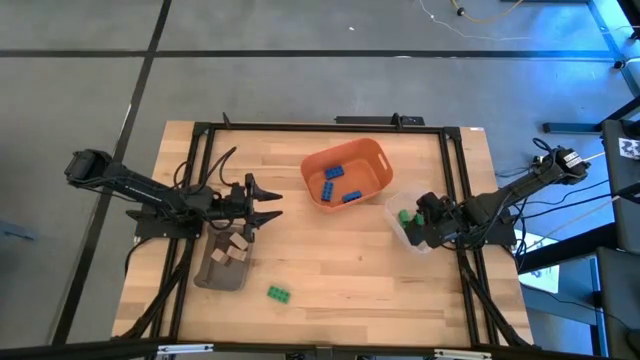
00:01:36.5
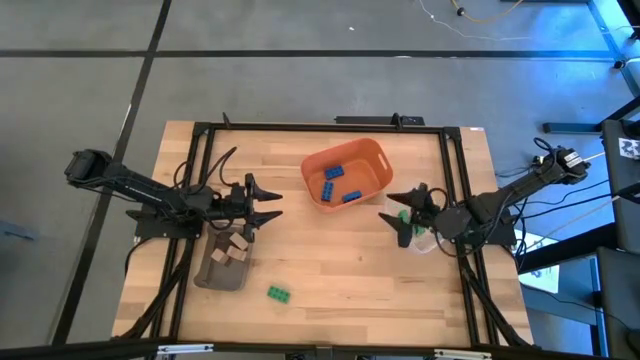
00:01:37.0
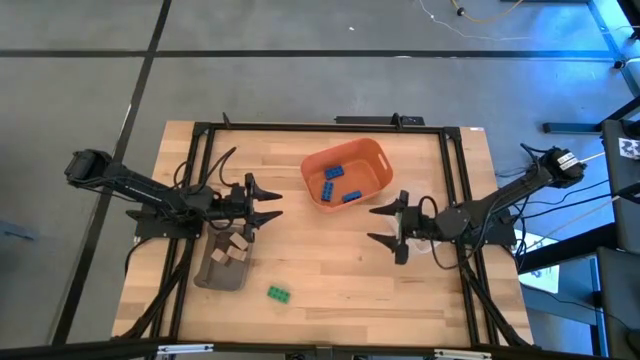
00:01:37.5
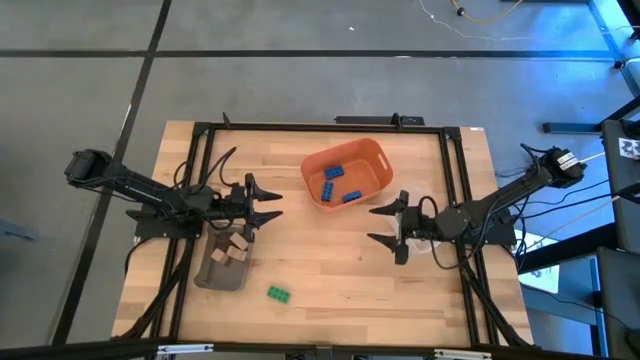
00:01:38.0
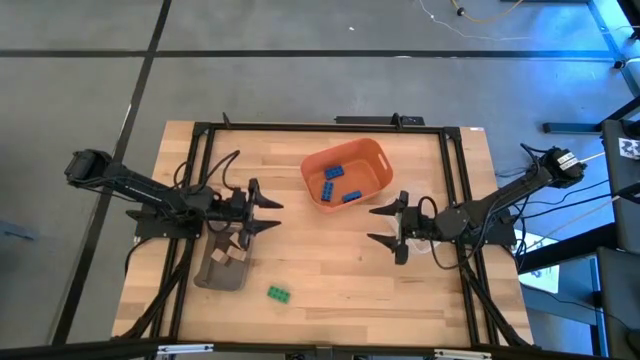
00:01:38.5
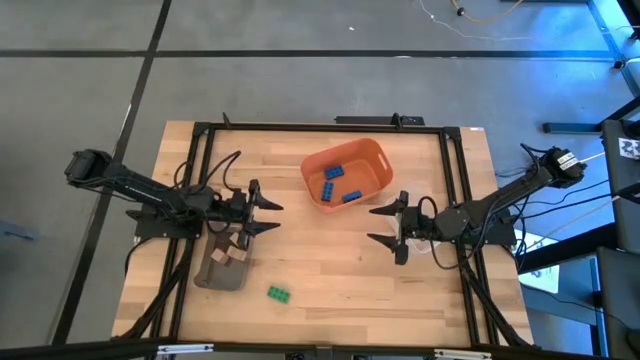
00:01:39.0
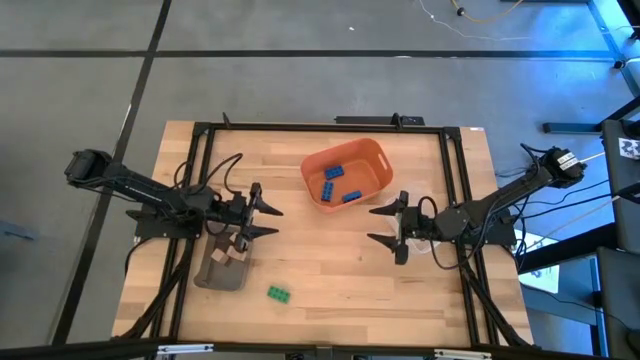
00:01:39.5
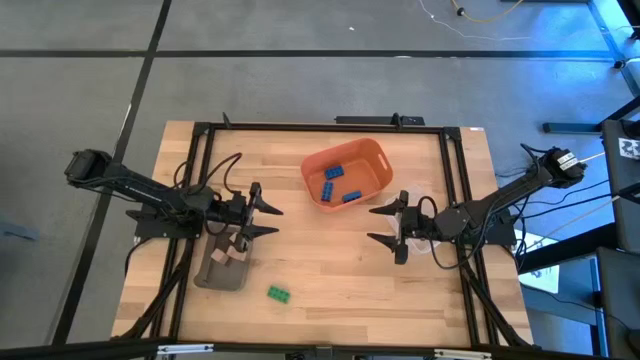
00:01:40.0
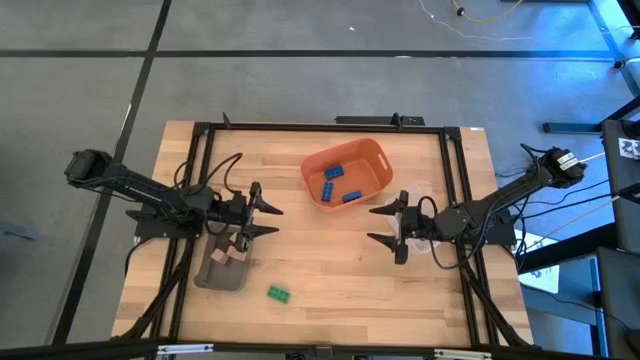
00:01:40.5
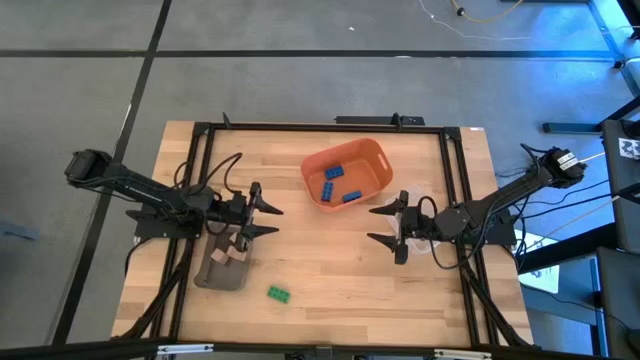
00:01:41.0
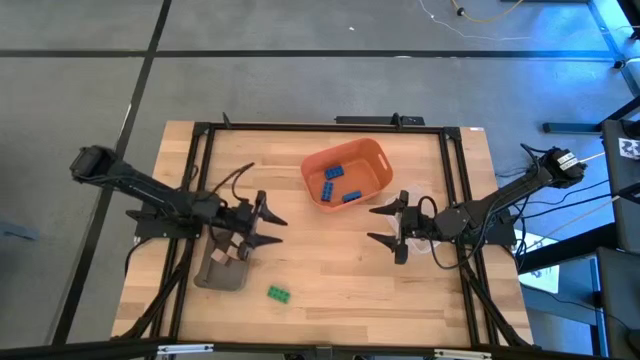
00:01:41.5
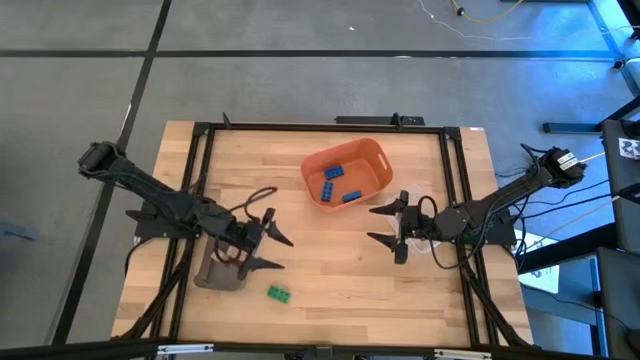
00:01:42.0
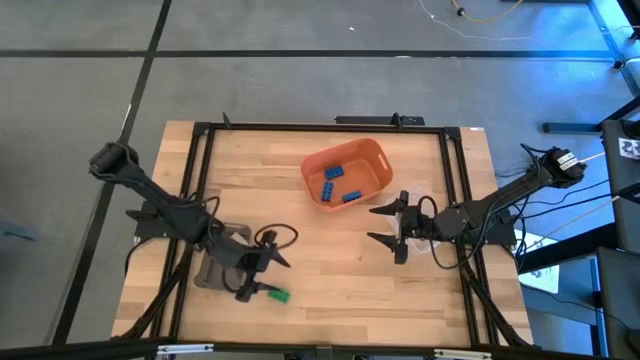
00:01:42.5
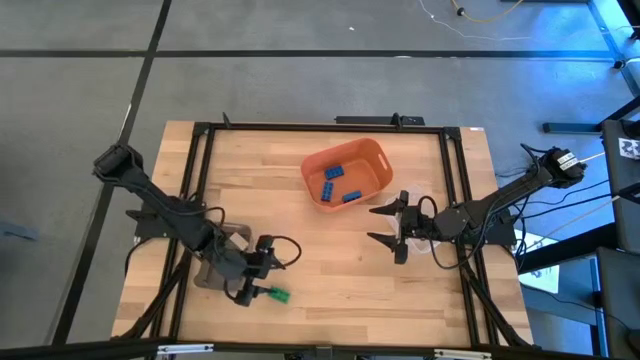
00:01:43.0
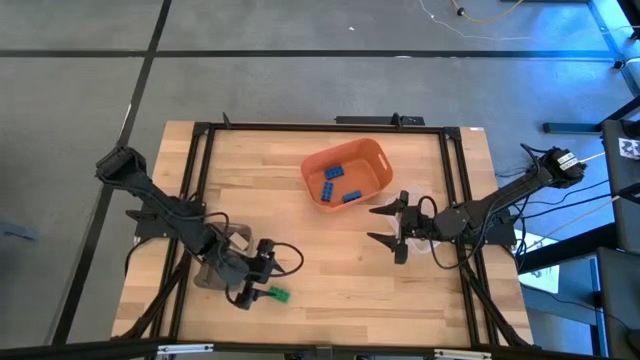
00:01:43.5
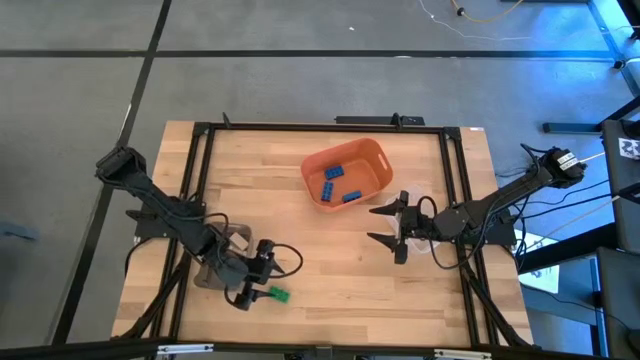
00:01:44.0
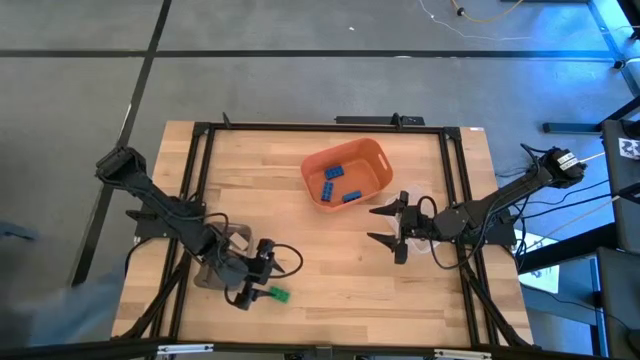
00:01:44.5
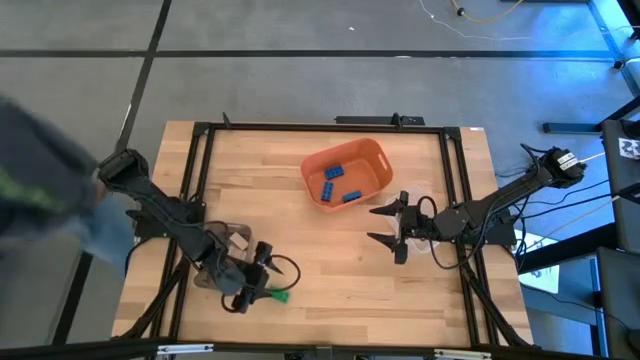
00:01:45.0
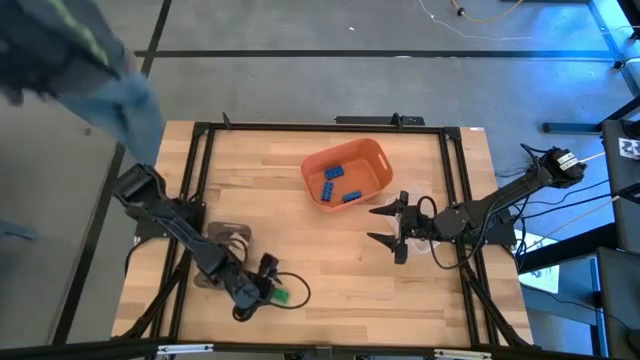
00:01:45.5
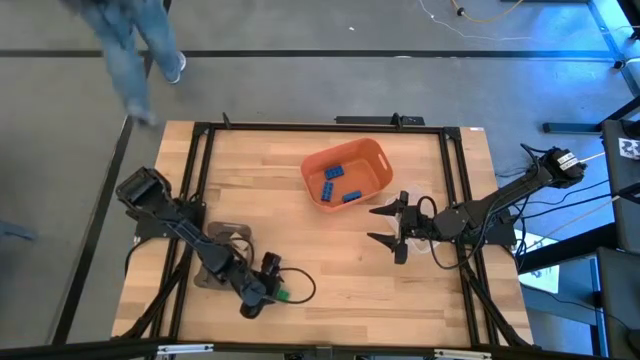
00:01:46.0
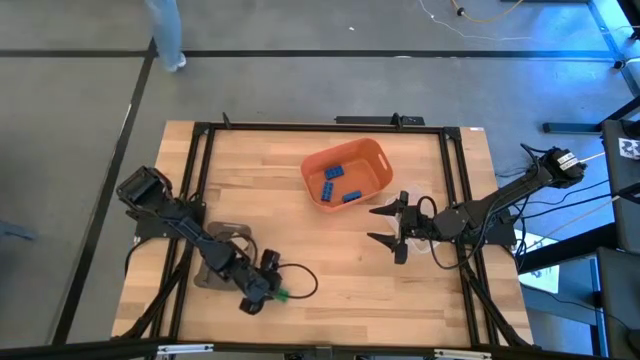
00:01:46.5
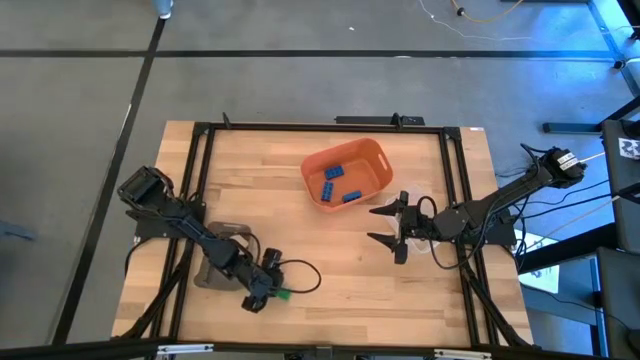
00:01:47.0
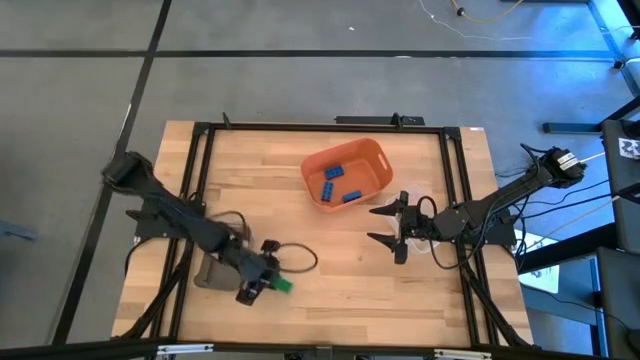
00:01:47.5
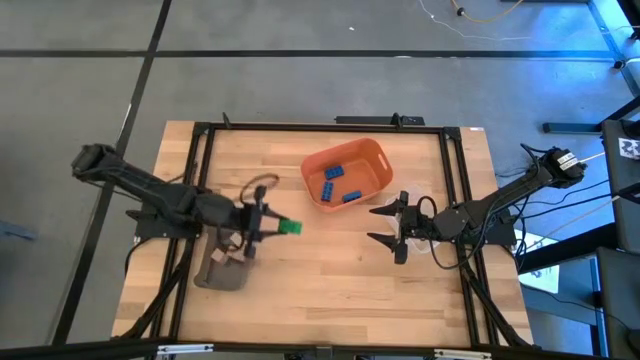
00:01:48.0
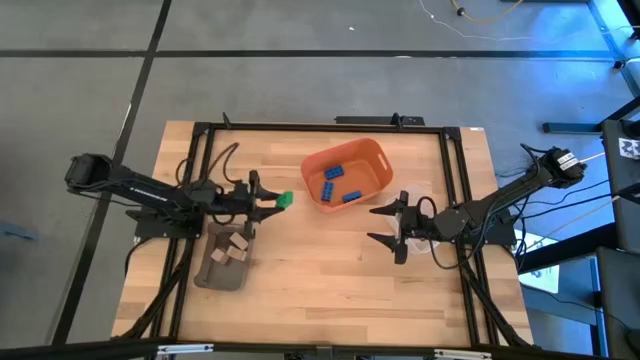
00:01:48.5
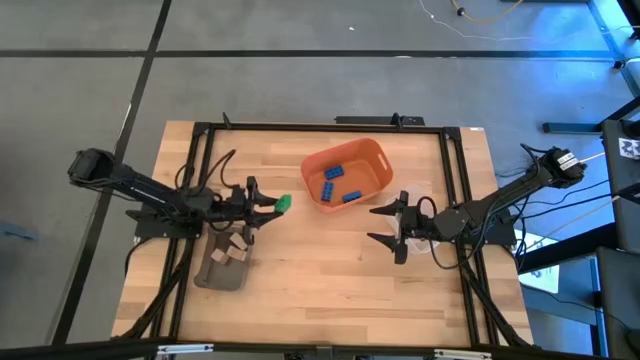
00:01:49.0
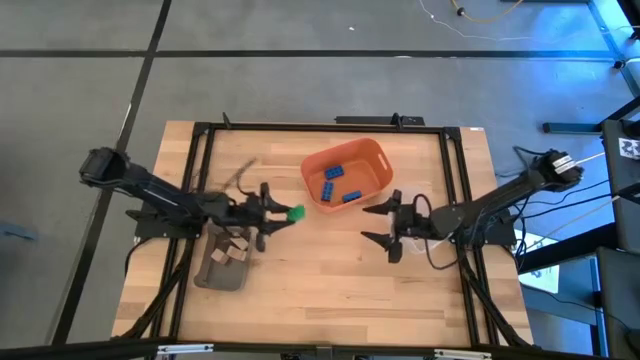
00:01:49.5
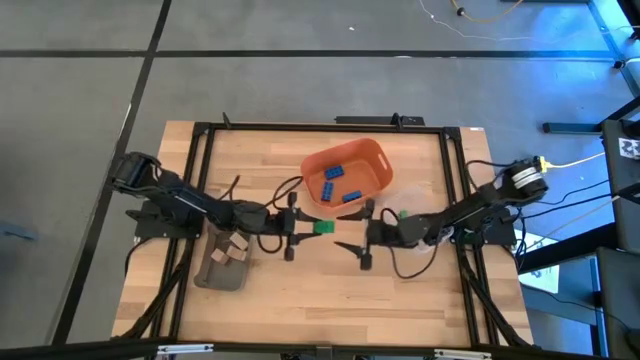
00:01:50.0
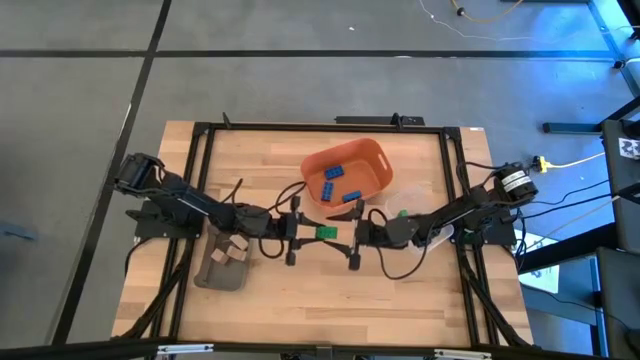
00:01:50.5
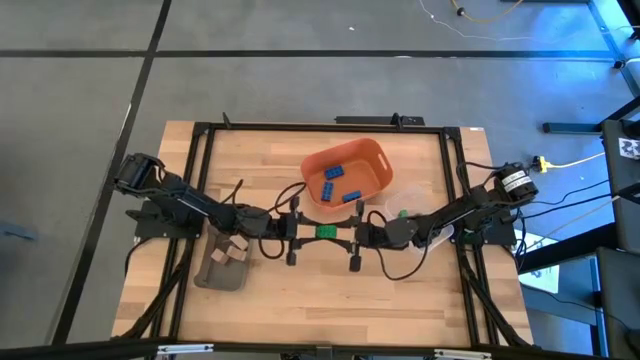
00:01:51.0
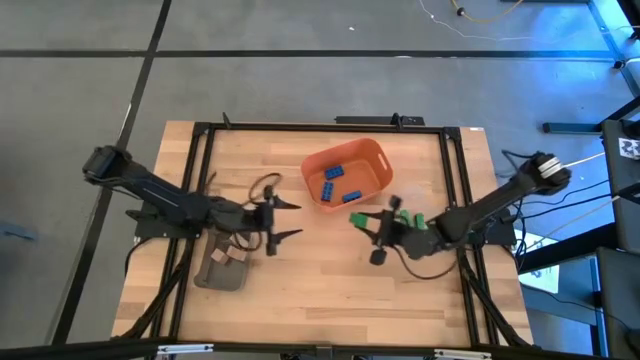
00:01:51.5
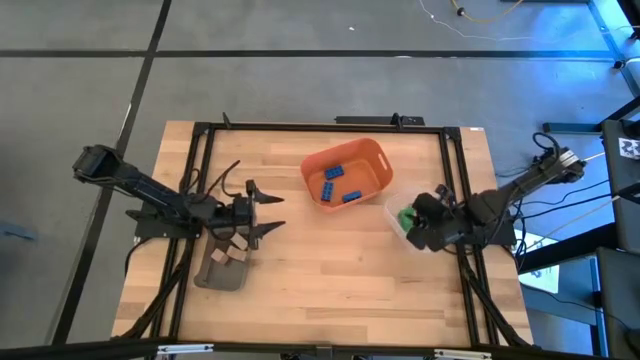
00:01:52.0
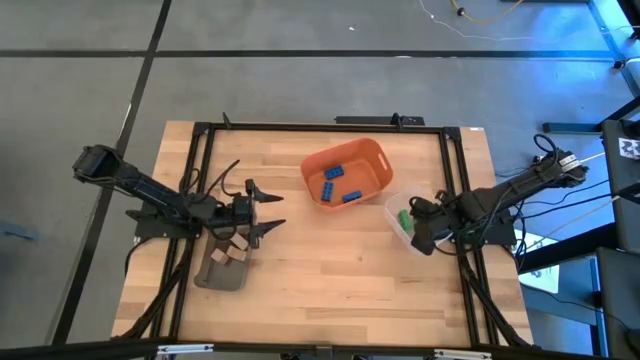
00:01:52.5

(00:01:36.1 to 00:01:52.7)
Task: Sort & place blocks by color
Put the green game piece into the transparent bin

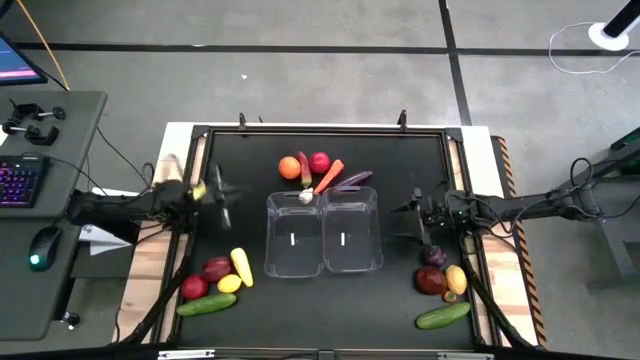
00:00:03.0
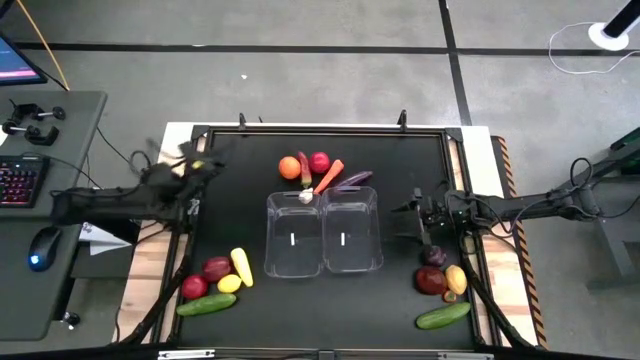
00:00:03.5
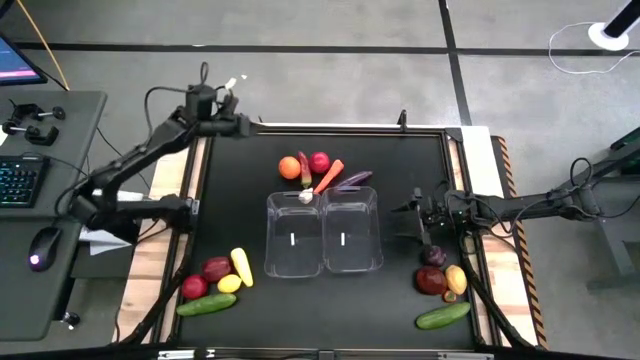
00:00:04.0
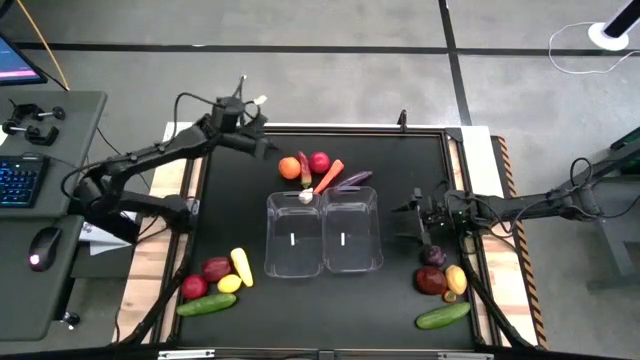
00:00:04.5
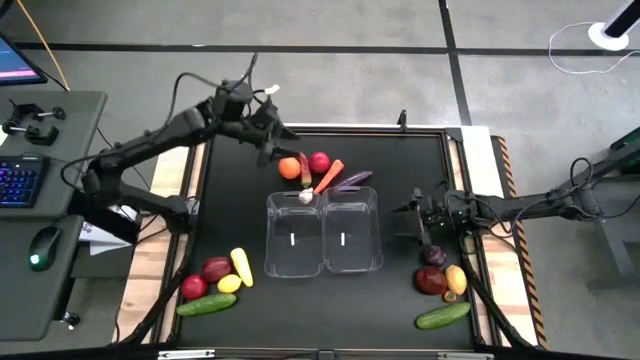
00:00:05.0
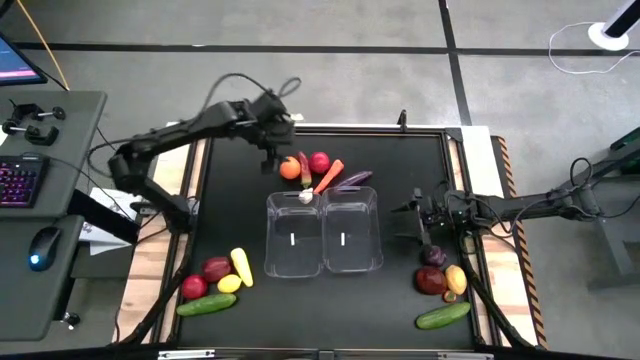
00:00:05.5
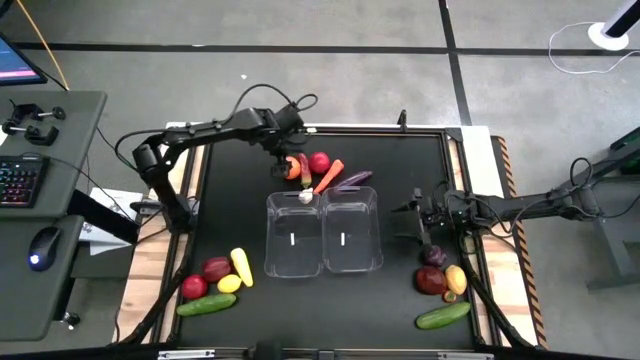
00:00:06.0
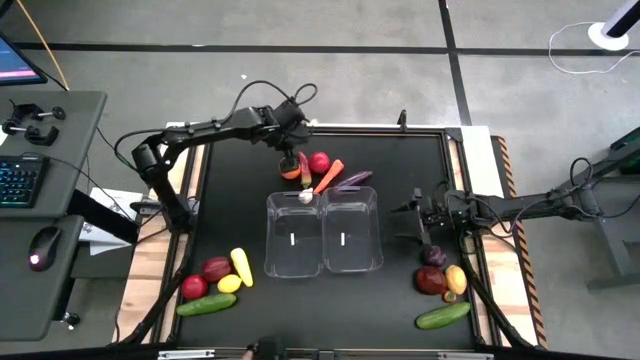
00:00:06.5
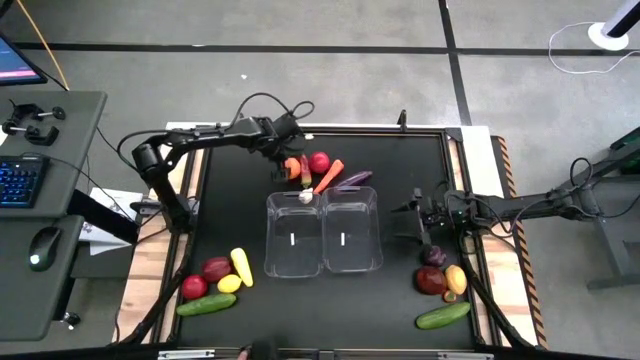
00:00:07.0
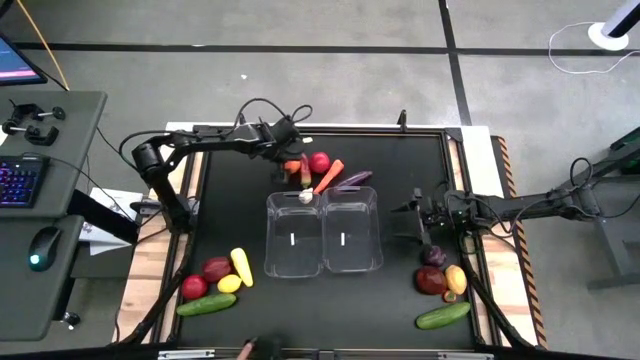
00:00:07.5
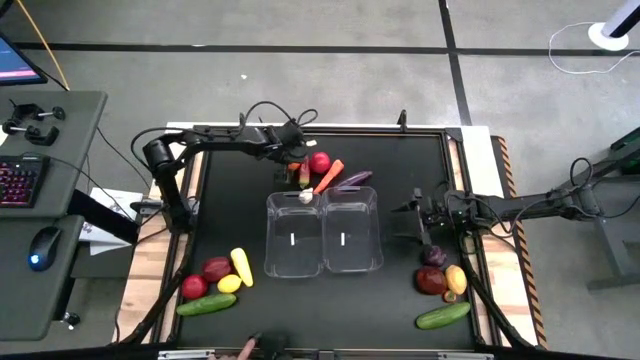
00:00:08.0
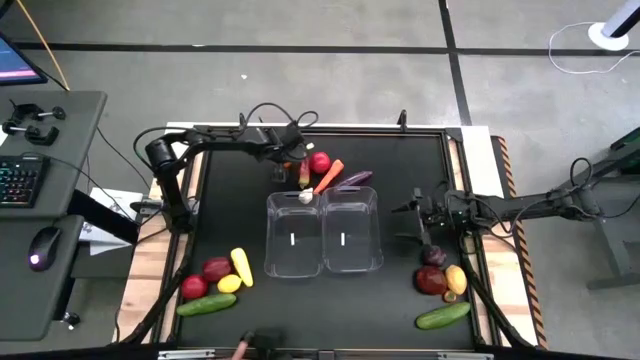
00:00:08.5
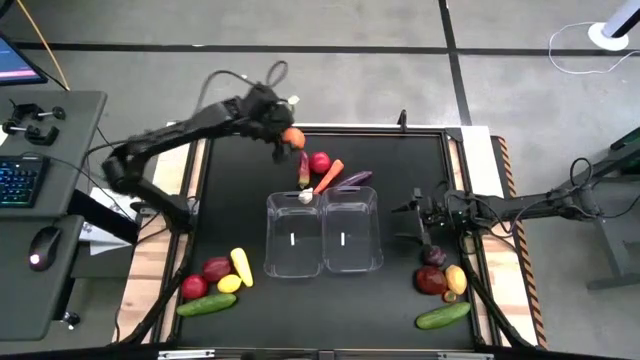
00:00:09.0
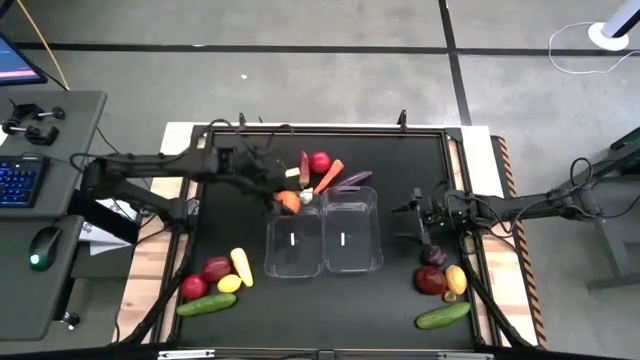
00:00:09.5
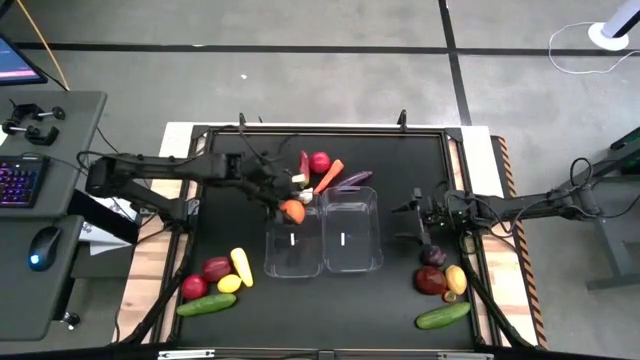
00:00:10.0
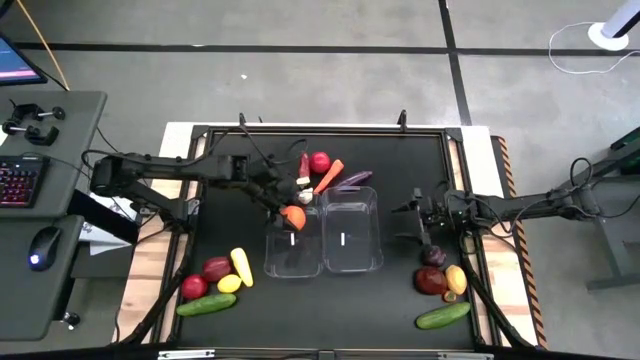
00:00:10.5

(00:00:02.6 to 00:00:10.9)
Task: Sort produce into baskets
Put the orange into the left transparent bin
